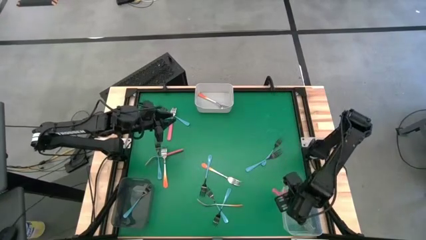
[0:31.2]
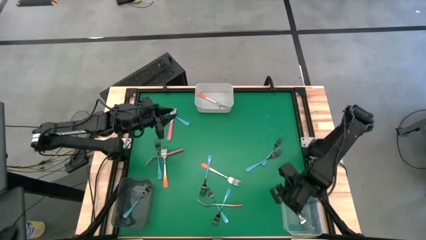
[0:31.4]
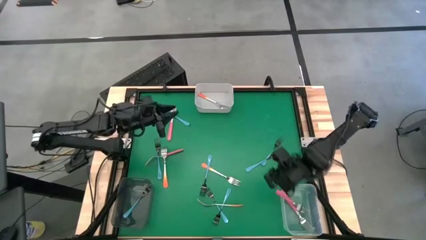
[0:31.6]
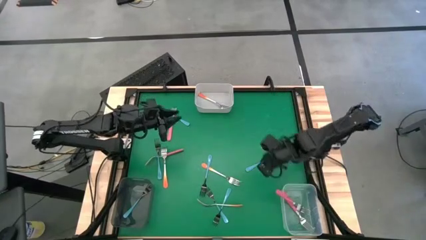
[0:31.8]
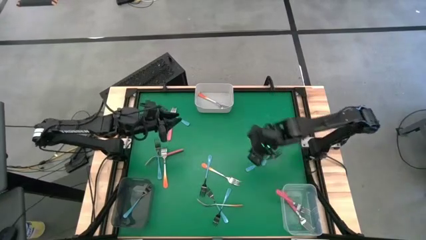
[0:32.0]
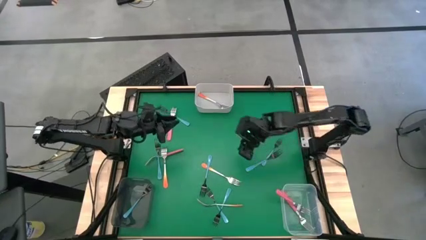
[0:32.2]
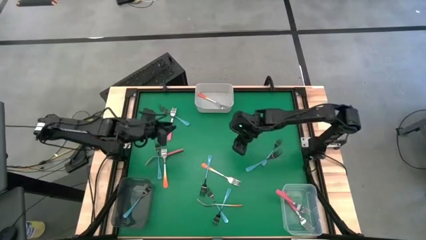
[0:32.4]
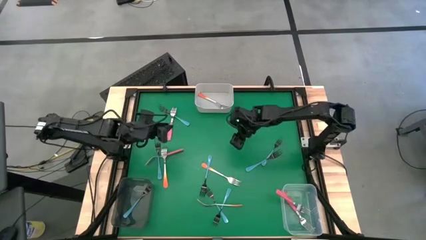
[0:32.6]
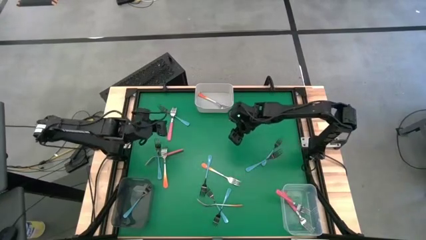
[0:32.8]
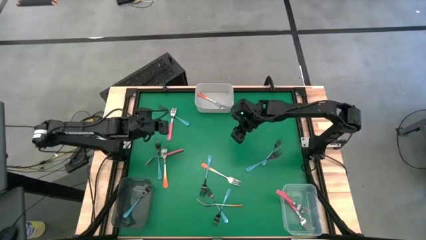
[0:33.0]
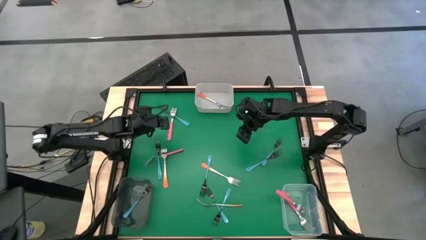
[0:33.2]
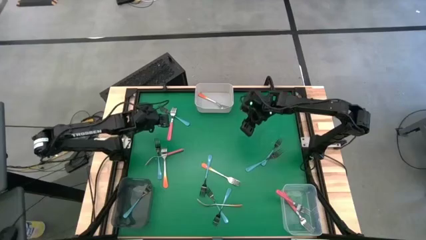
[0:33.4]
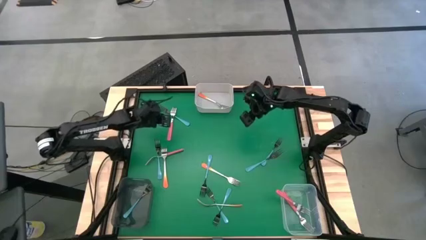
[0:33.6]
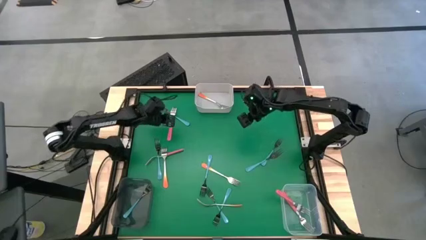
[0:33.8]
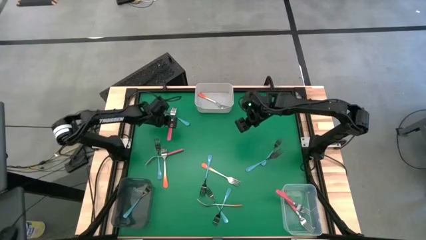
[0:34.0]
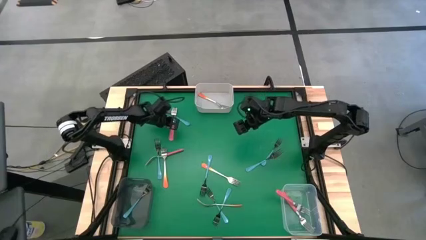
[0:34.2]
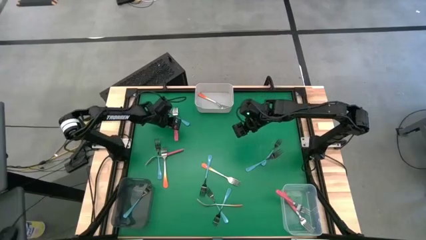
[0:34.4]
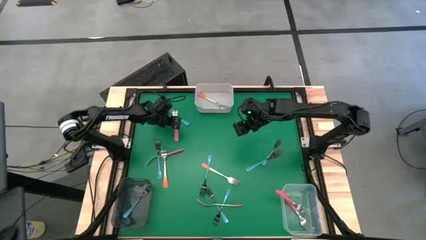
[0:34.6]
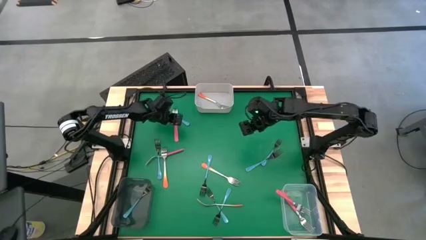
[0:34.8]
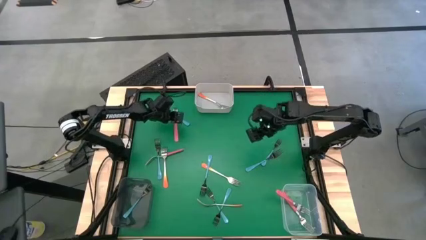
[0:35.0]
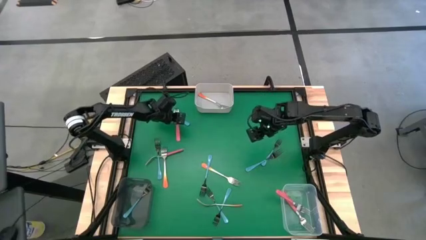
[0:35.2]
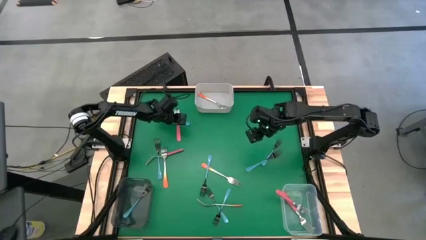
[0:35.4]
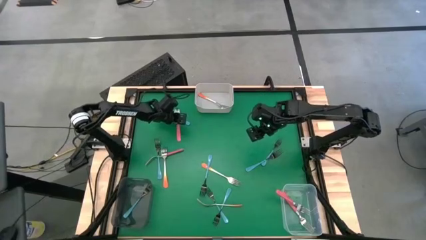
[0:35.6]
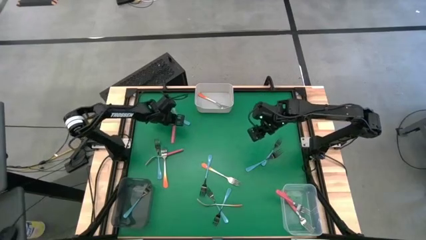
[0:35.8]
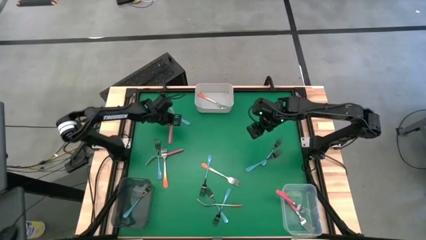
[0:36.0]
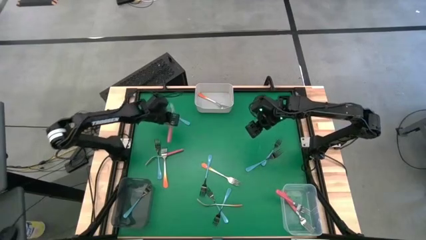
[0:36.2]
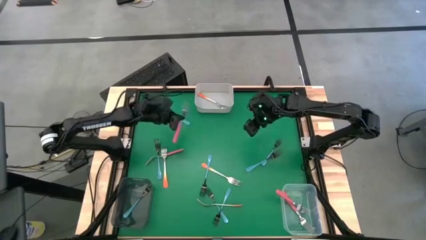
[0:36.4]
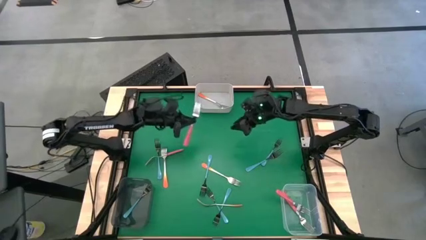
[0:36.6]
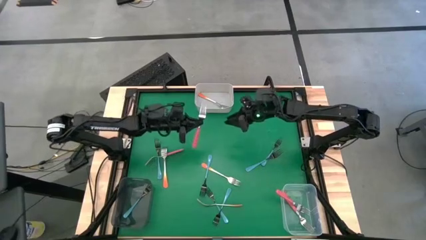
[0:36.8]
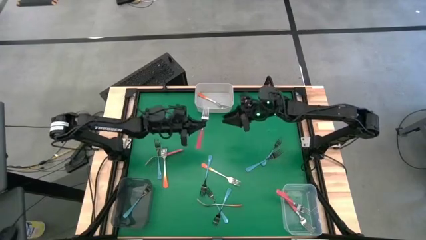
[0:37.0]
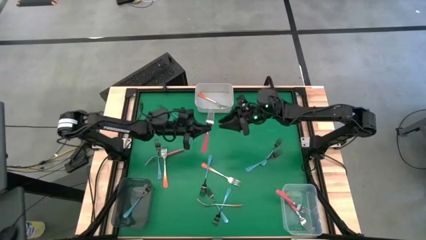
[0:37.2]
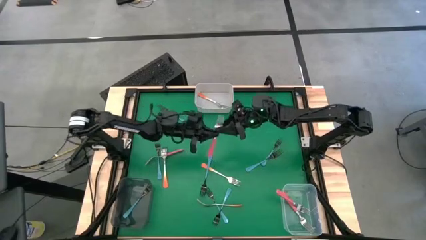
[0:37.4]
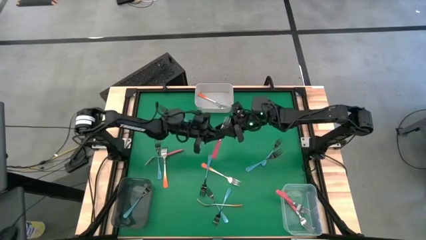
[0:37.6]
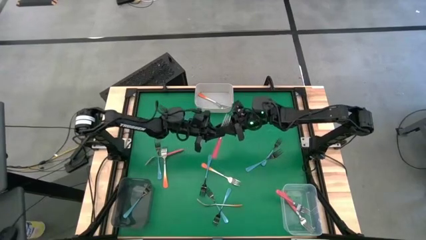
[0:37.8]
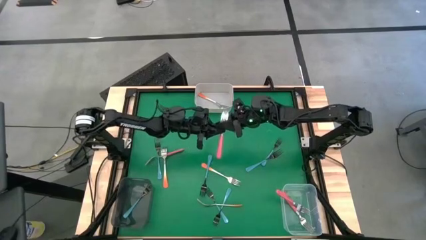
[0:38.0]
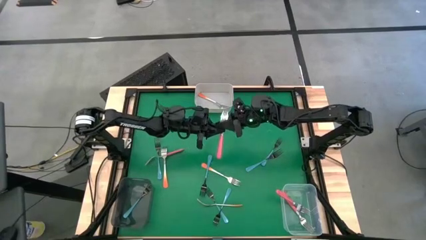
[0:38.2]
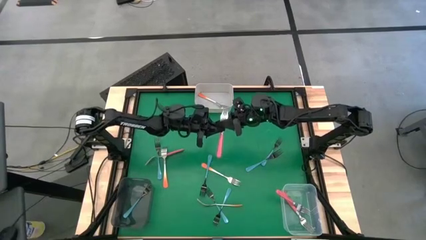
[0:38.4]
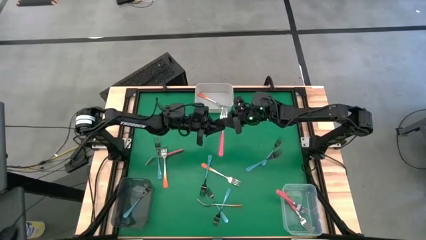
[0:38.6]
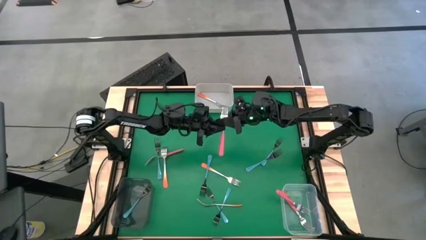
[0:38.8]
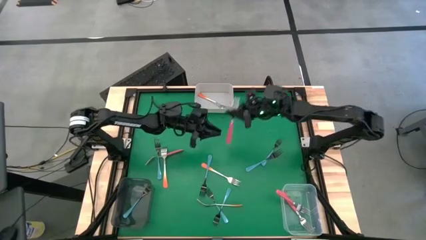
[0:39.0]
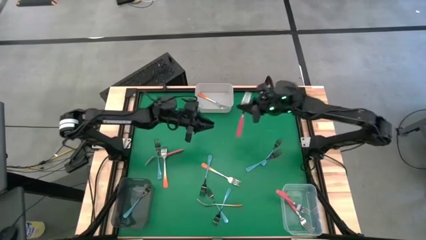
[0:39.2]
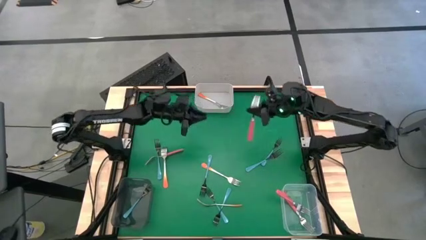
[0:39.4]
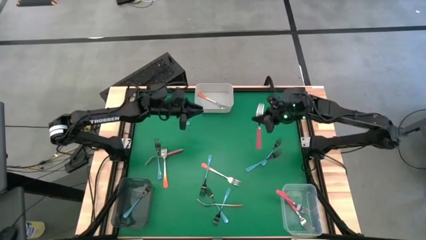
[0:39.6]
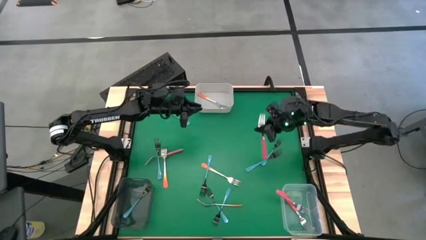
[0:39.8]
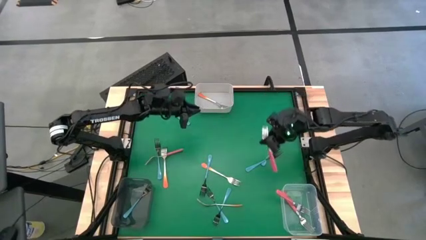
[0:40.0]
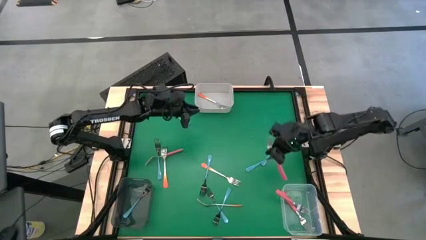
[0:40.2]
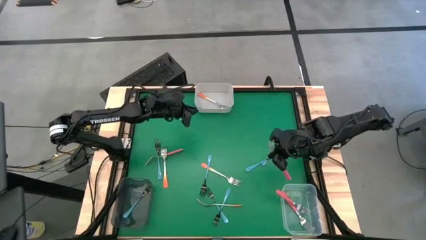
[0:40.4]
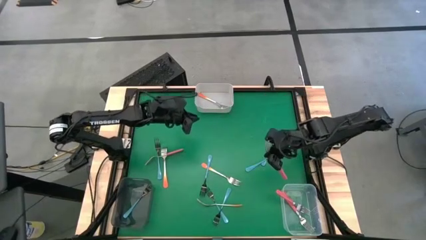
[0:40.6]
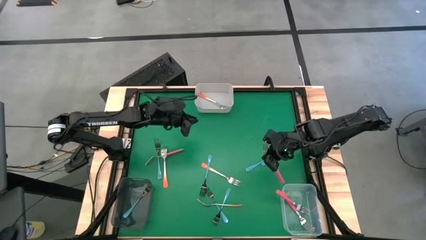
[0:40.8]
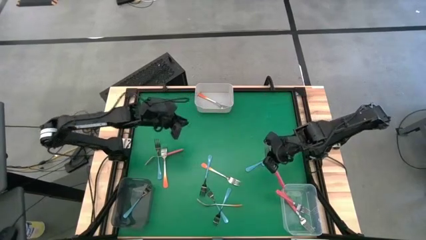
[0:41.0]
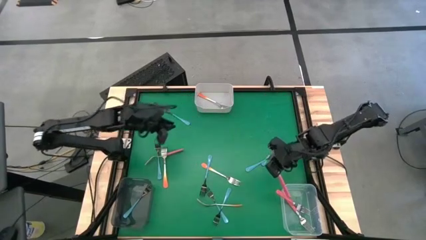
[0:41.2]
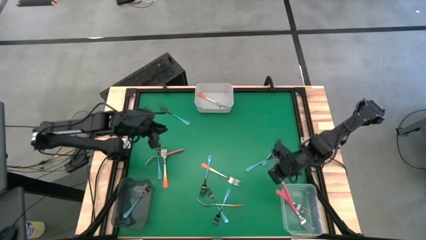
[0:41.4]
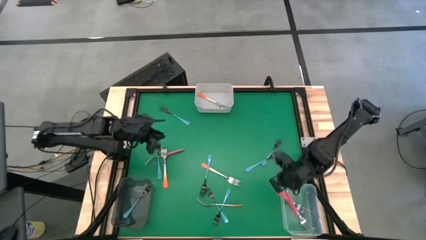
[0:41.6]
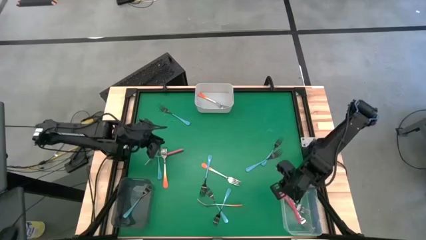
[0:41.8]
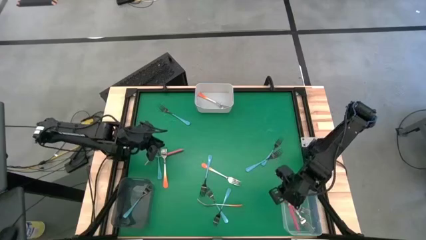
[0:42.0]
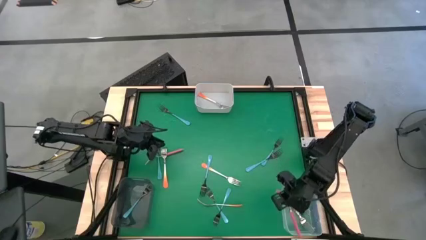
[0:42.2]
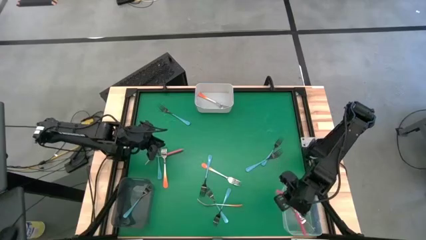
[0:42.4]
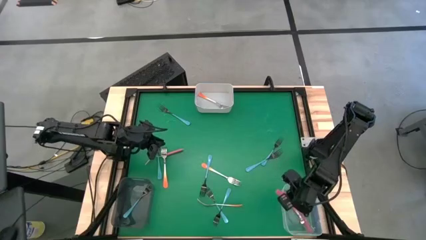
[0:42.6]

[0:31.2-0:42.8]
Task: Sort silverware by color (type)
Put the pink fork into the transparent bin

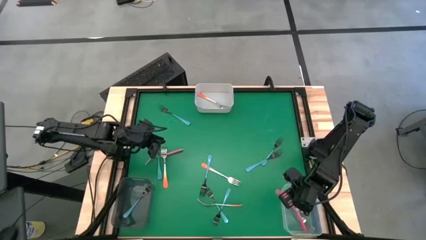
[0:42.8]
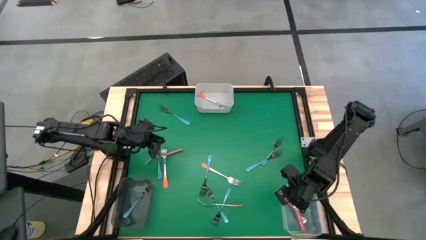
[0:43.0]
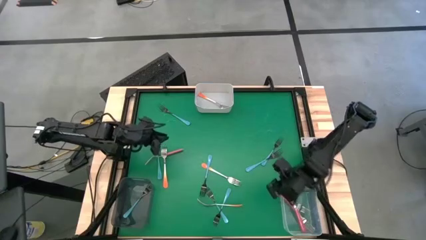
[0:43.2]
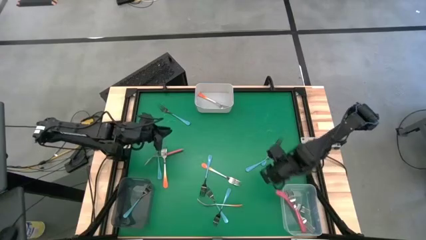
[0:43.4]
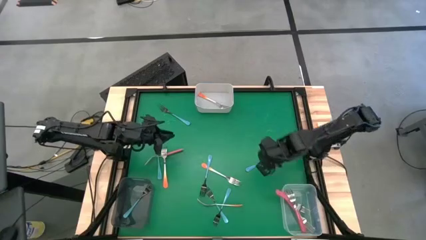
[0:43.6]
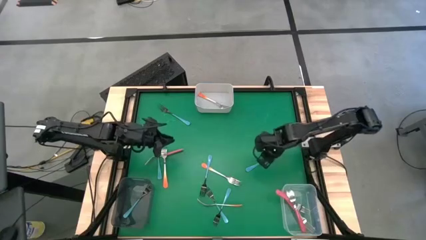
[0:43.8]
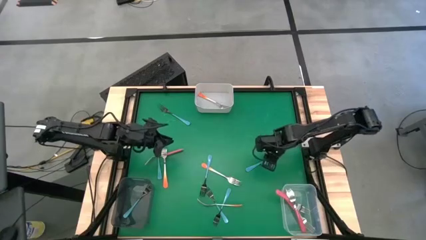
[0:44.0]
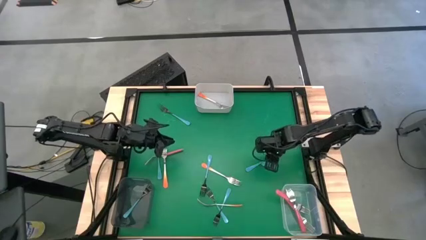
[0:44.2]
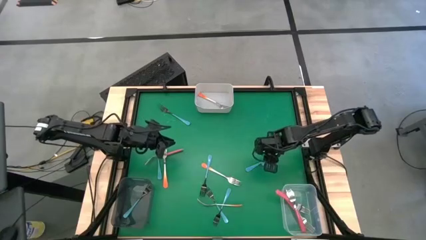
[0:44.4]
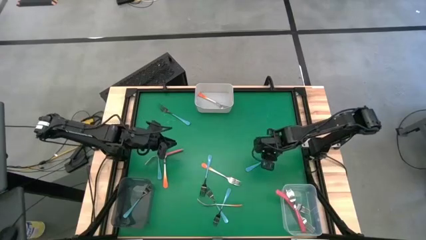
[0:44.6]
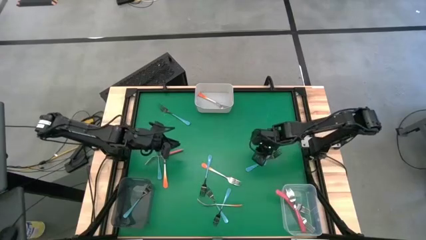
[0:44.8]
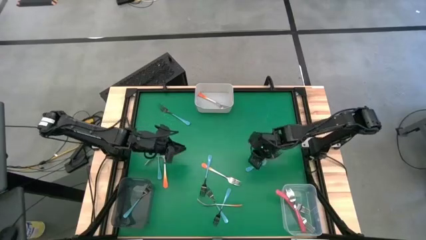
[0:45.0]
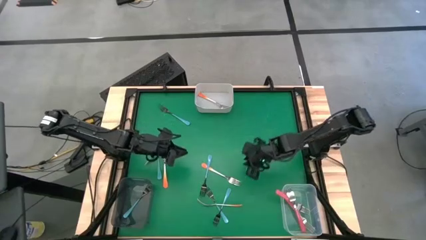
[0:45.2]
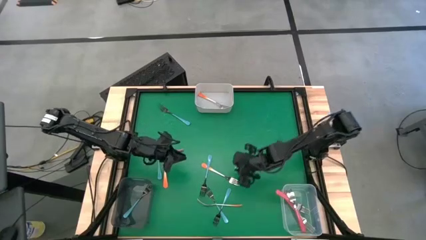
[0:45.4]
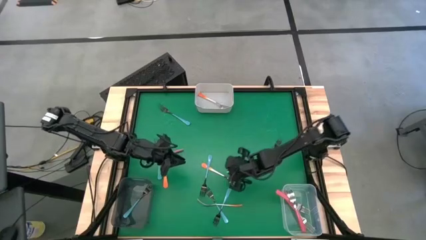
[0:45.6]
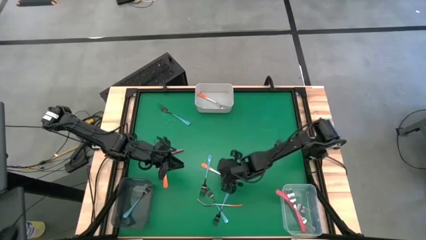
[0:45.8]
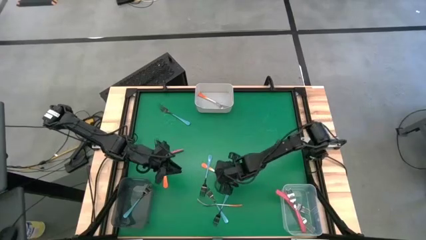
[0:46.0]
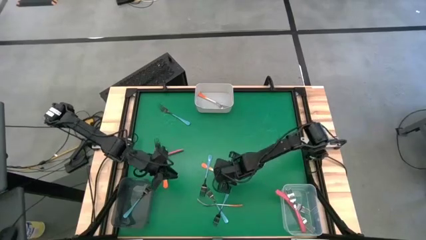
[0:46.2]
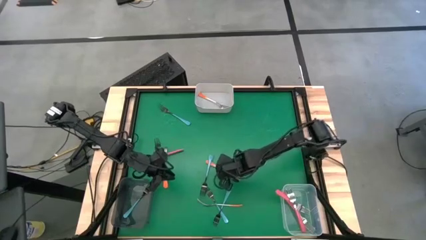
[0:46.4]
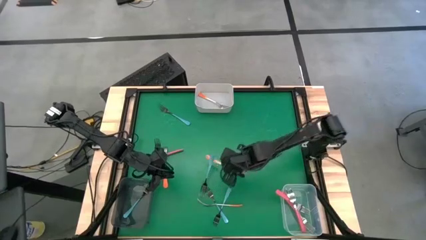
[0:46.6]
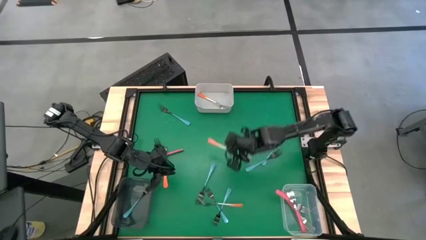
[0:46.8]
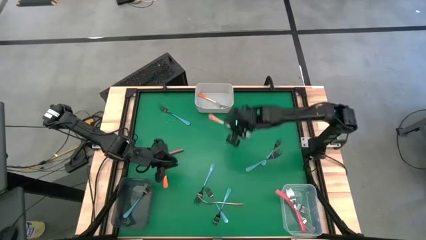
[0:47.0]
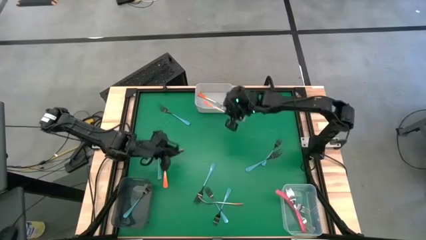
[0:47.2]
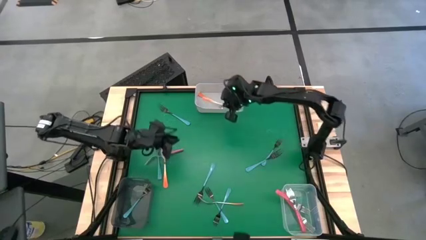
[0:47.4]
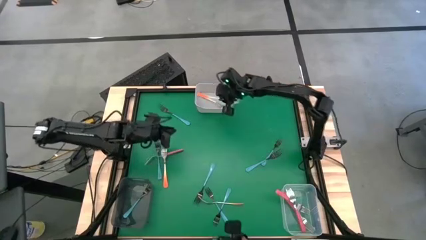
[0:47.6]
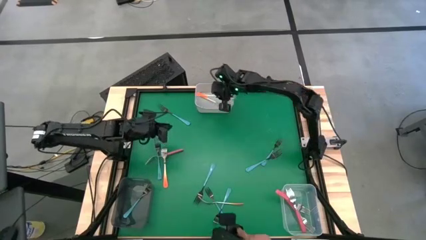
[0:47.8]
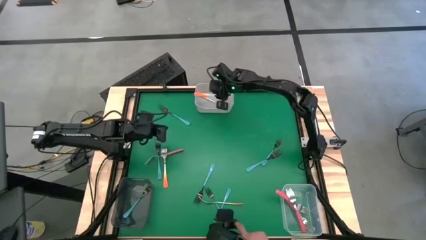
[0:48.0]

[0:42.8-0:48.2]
Put the orange fork into the white bin
